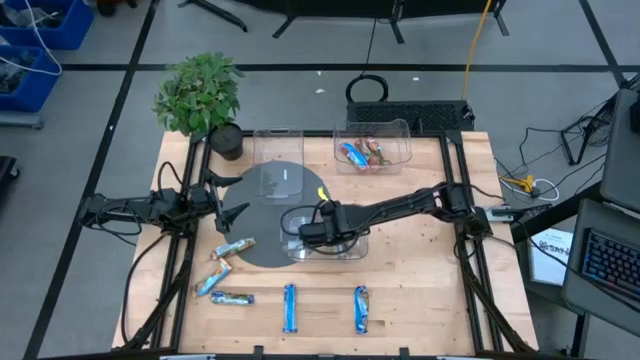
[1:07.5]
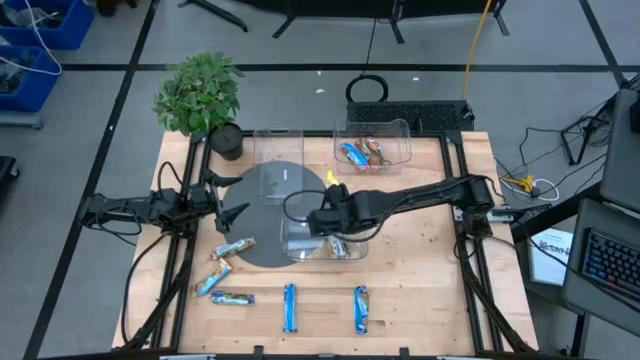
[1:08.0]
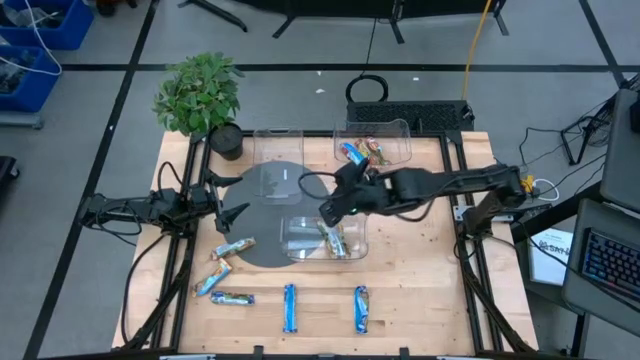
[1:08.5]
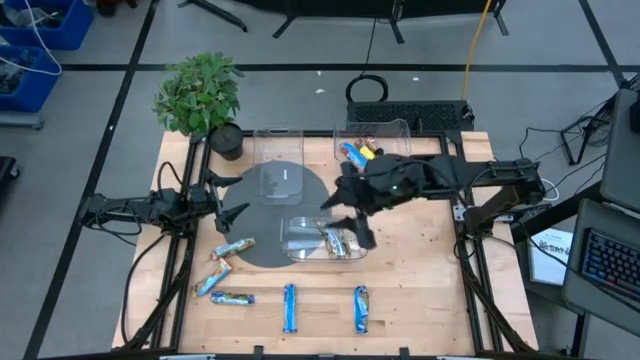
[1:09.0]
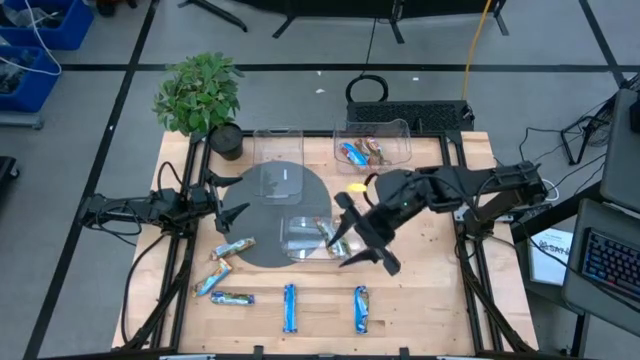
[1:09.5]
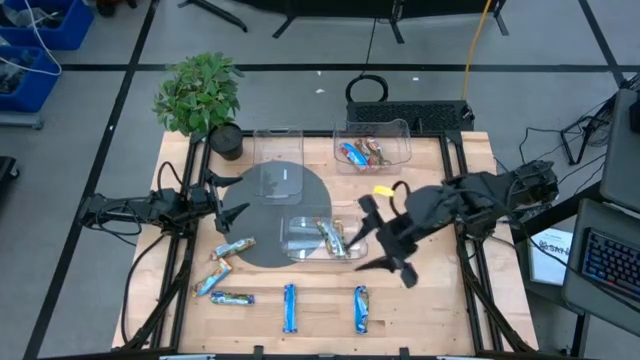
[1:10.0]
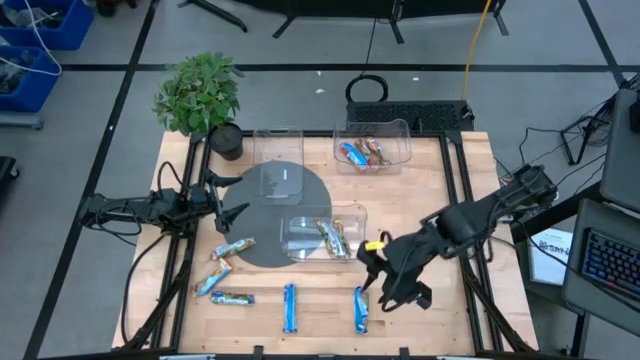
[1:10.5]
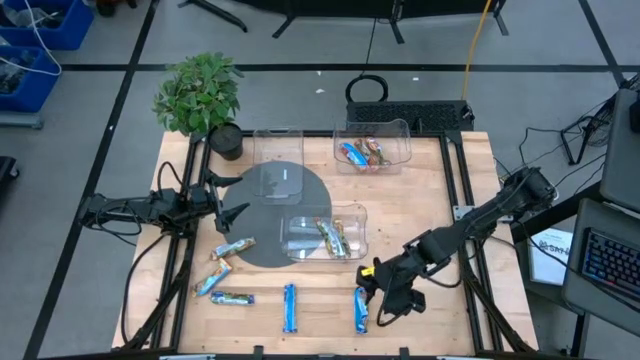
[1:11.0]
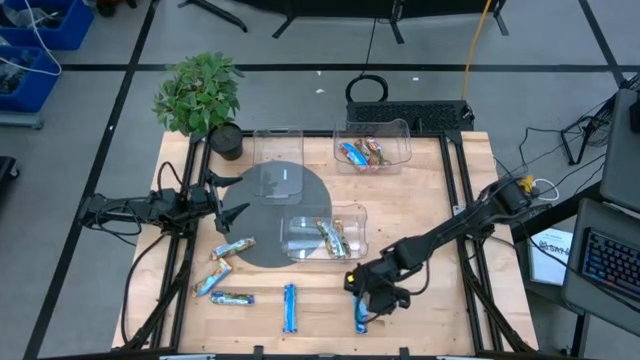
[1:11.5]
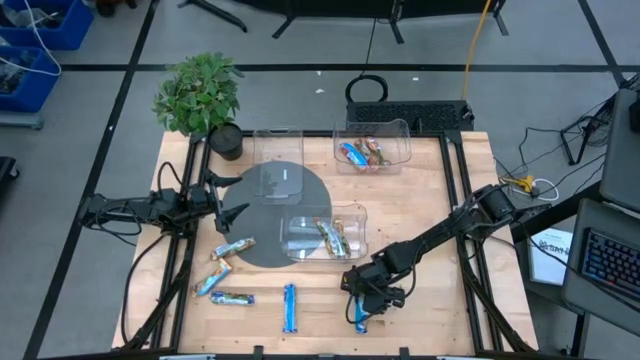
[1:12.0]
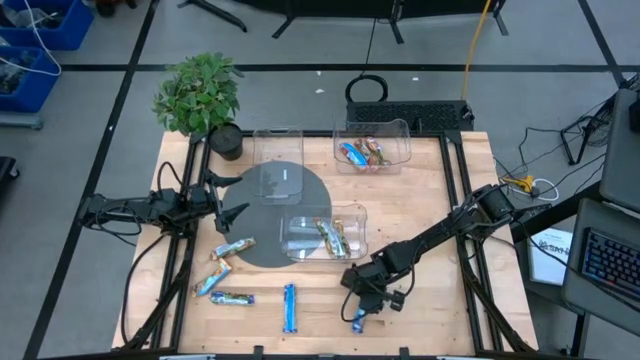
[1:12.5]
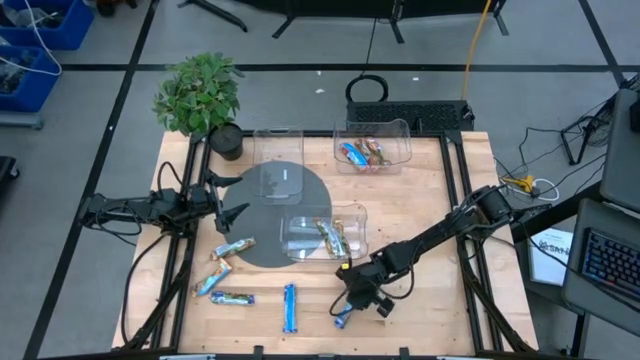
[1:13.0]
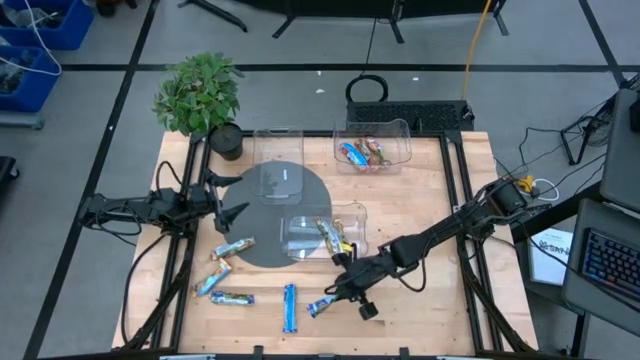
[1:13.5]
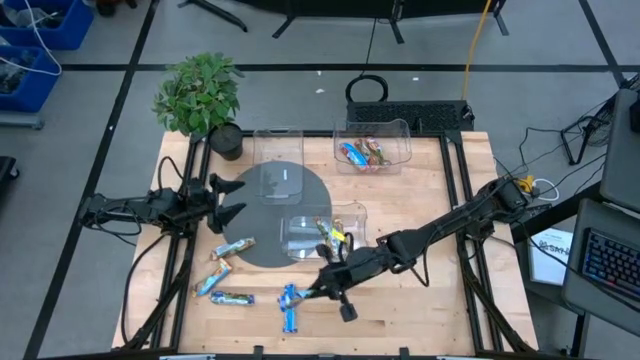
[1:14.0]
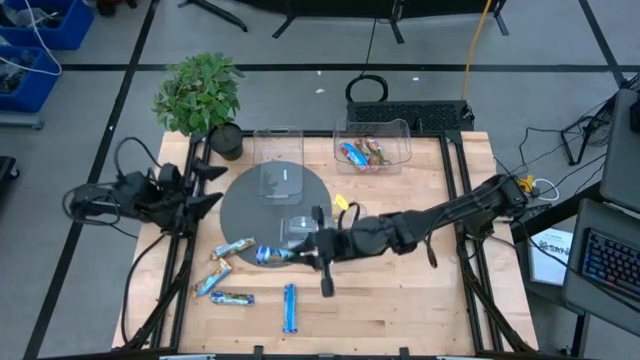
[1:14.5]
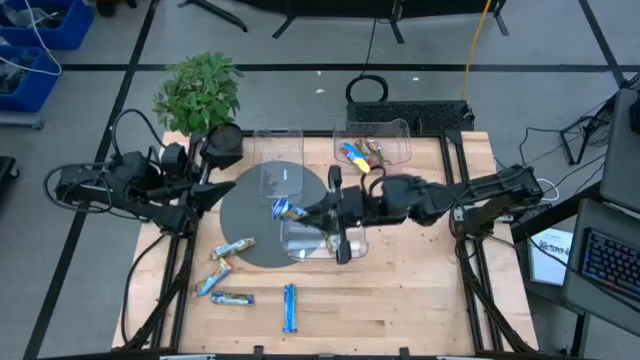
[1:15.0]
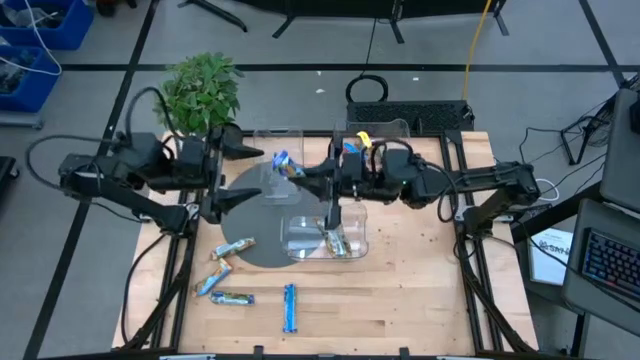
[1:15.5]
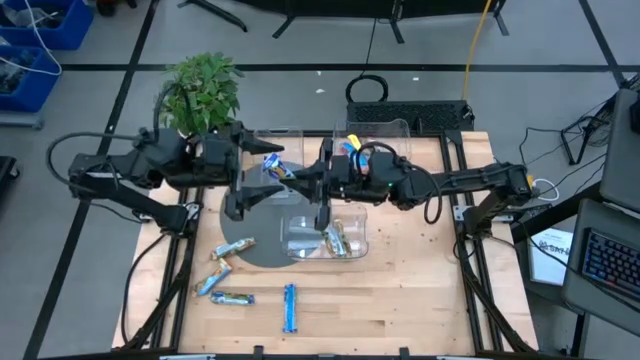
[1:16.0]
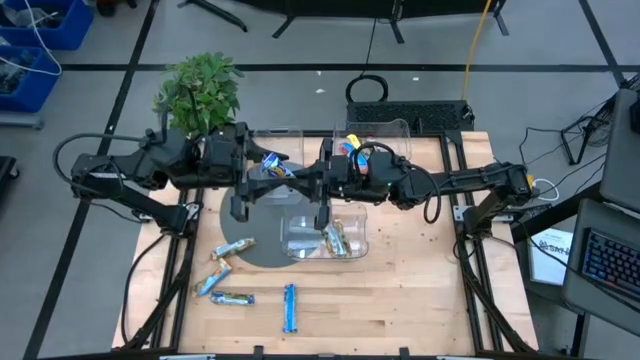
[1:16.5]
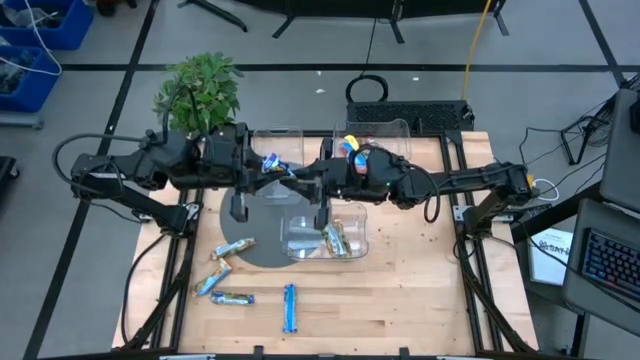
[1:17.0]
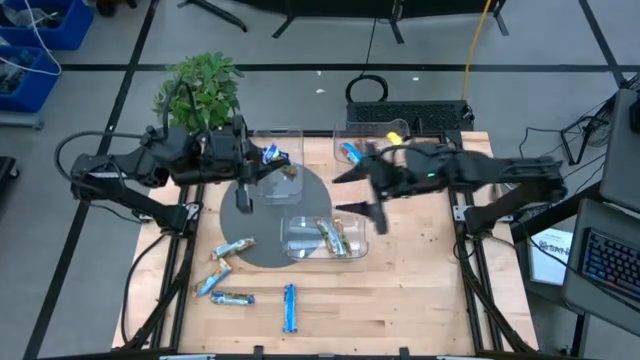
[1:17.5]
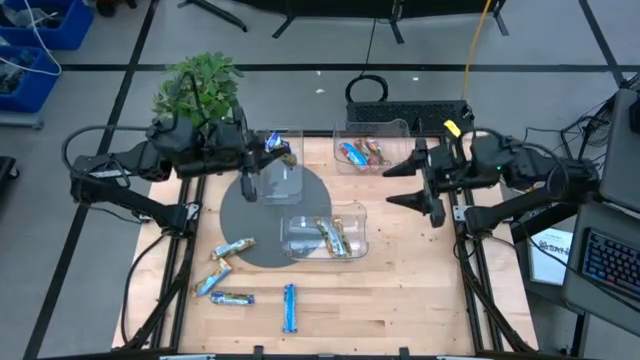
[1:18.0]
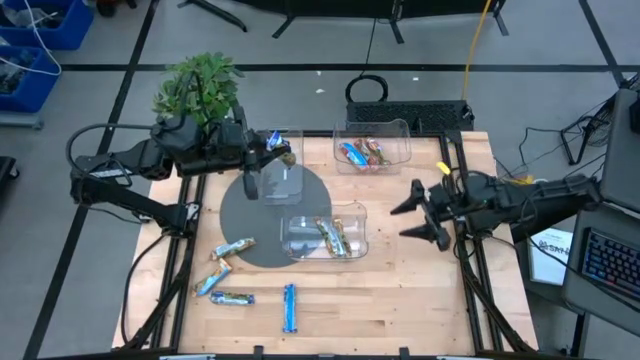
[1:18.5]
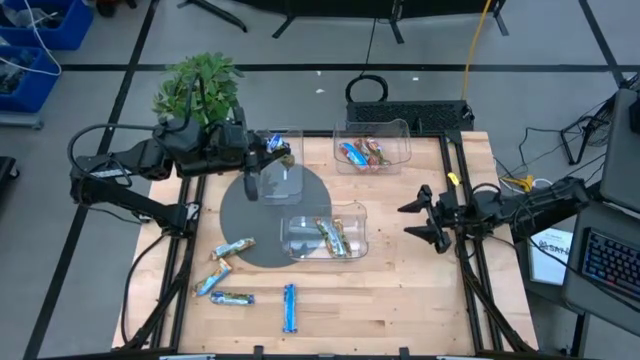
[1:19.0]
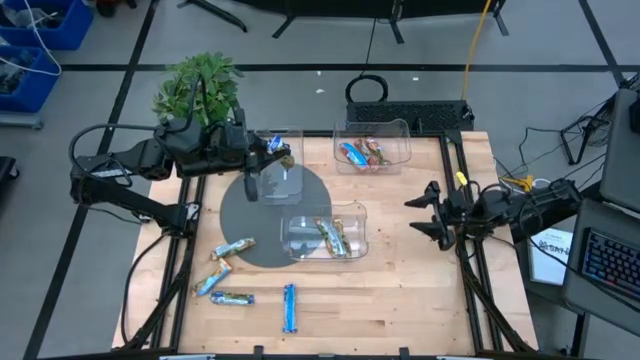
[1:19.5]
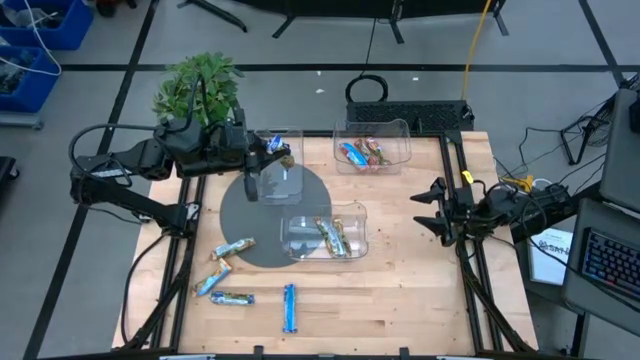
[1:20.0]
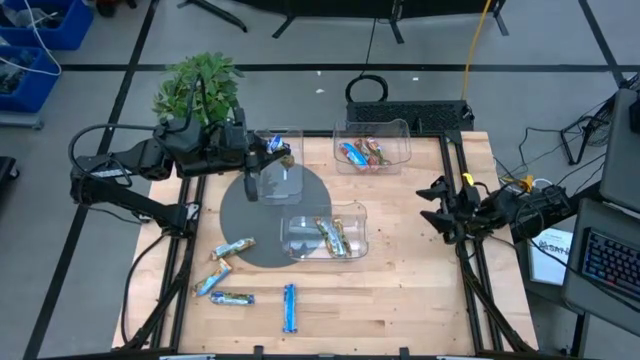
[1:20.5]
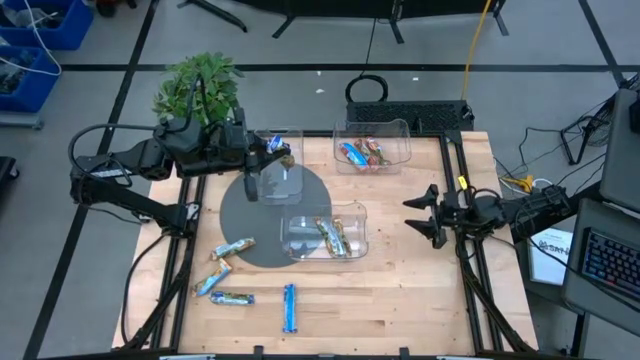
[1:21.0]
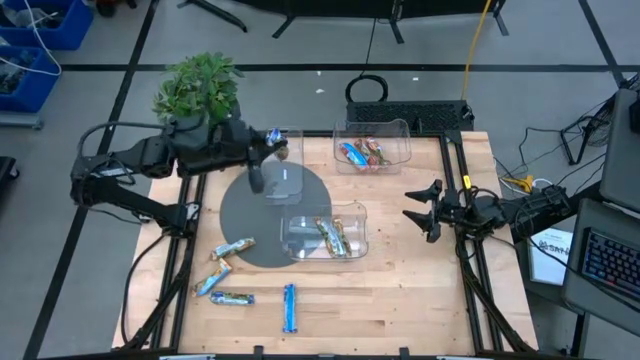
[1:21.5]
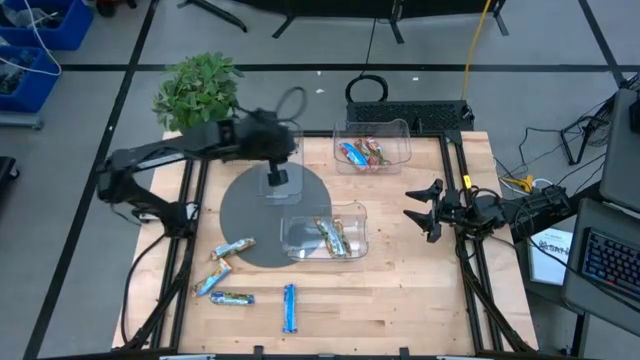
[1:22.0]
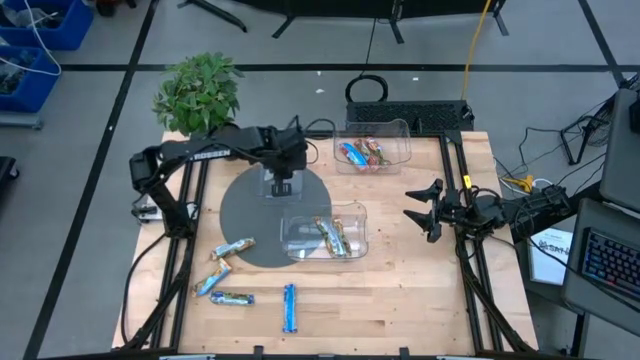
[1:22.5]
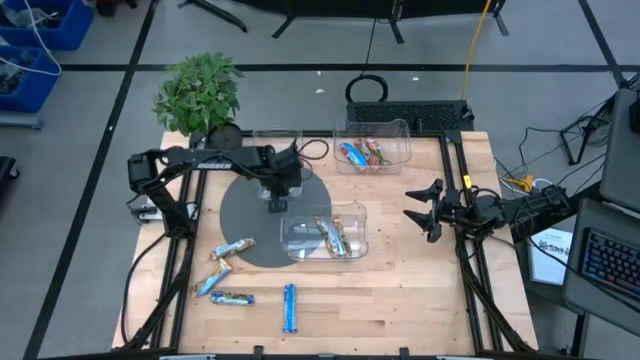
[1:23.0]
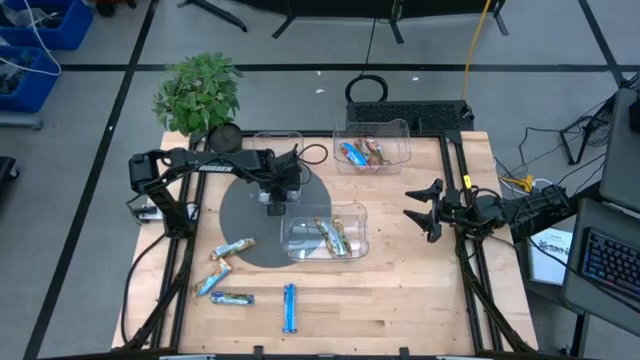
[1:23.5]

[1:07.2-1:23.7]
Task: Pick and place Granola Bars by type
Put the blue granola bar into the top left transparent bin
